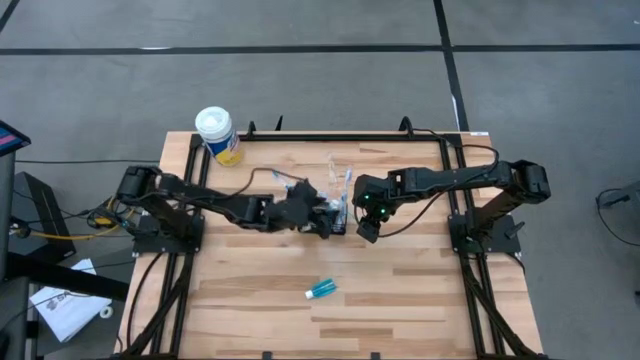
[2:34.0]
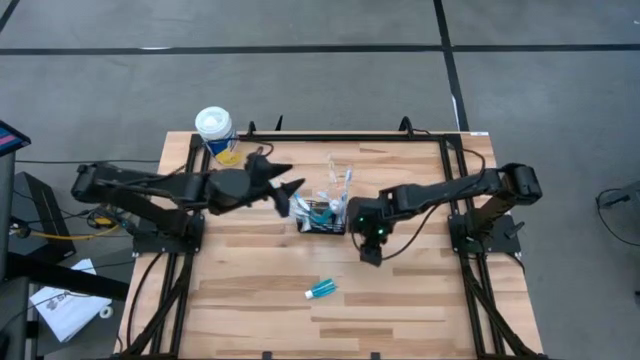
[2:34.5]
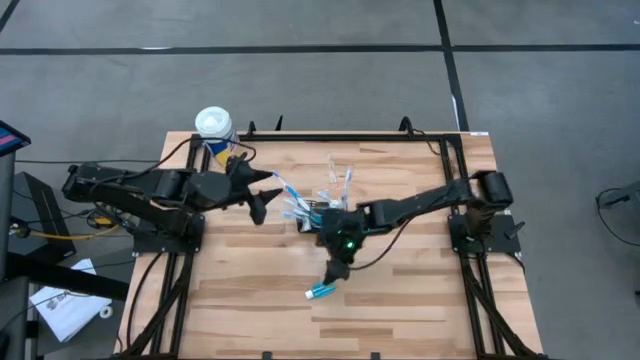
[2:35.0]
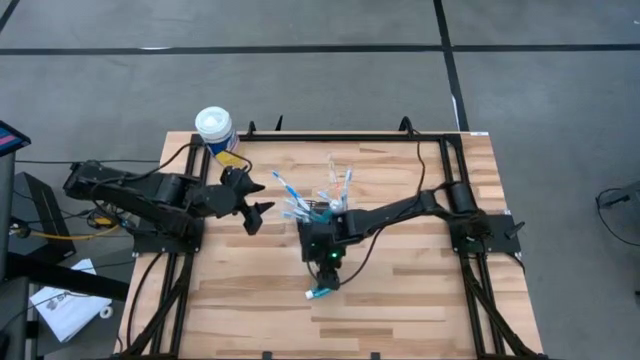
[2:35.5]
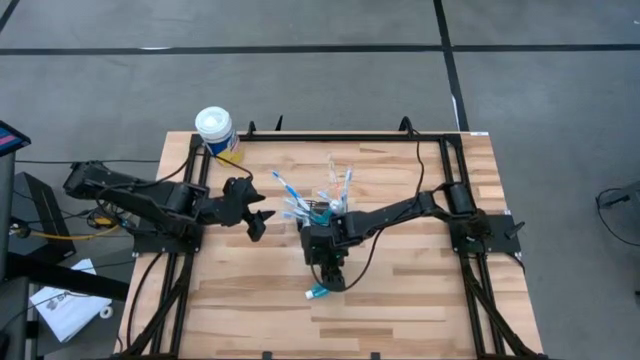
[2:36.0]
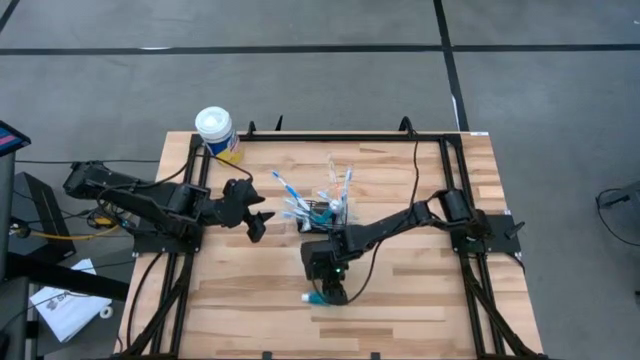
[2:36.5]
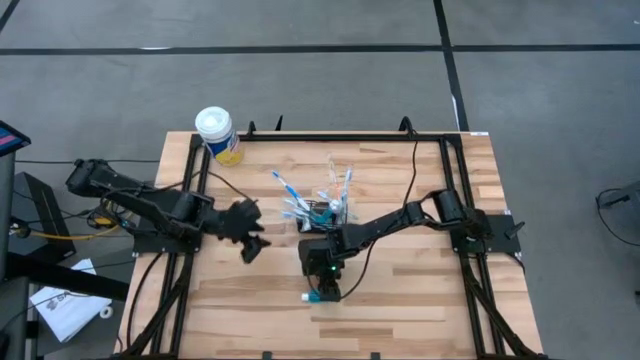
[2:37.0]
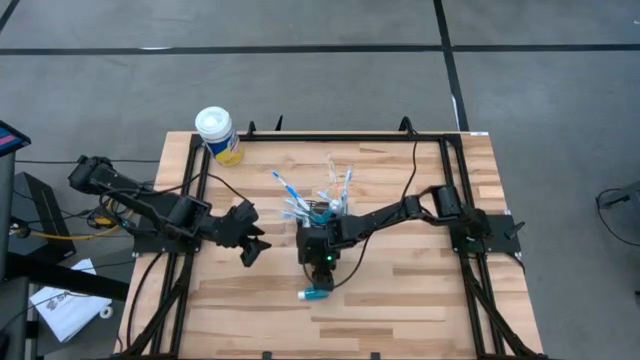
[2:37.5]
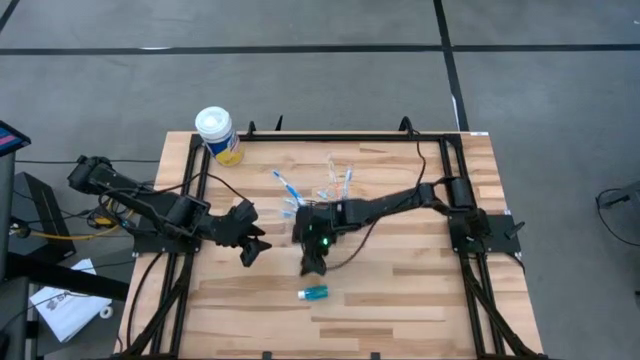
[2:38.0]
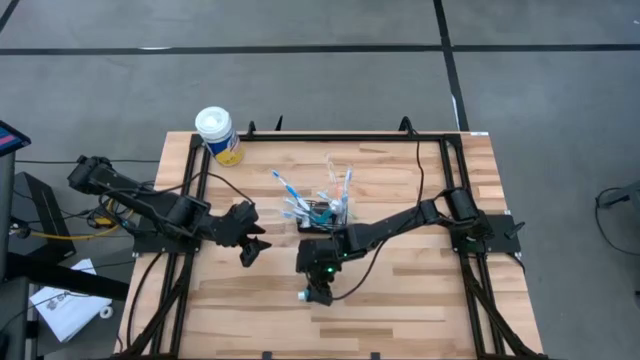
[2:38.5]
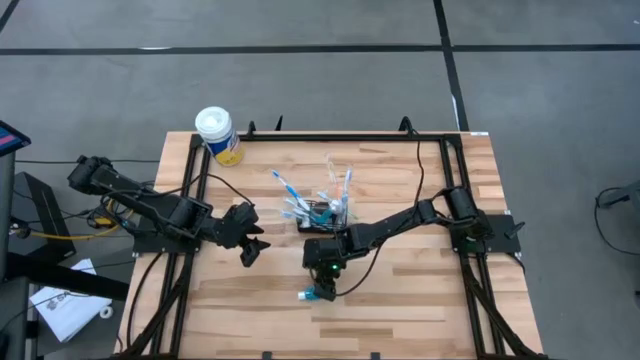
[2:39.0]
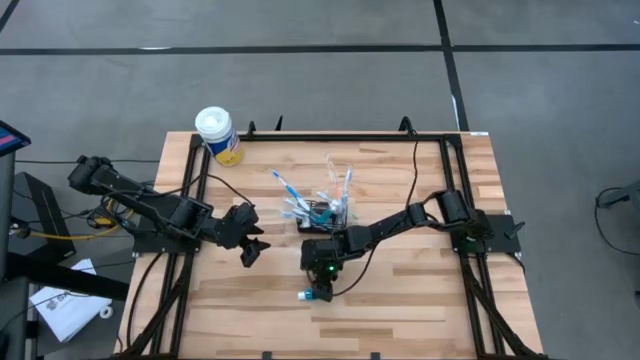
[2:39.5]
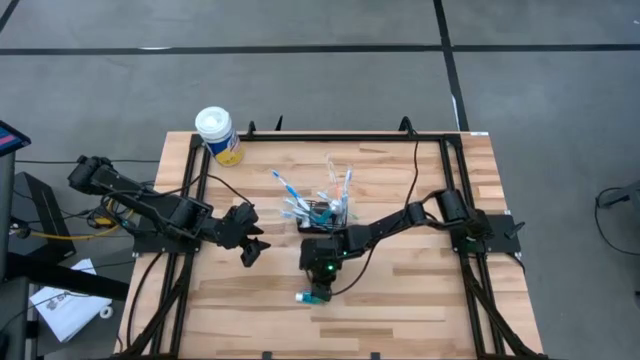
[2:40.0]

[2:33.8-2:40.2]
Task: Pick & Place toothbrushing station
Put the blue mouthwash into the mesh

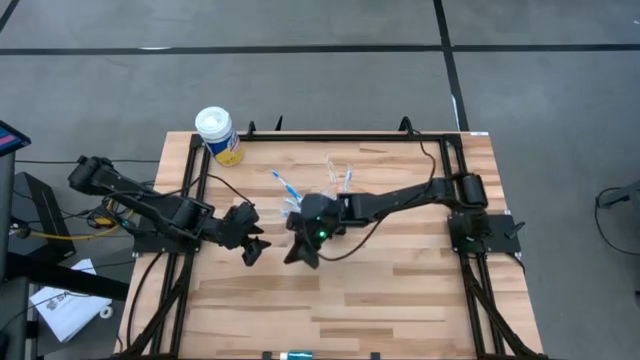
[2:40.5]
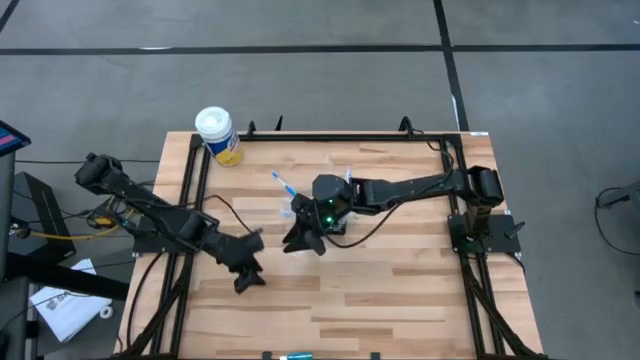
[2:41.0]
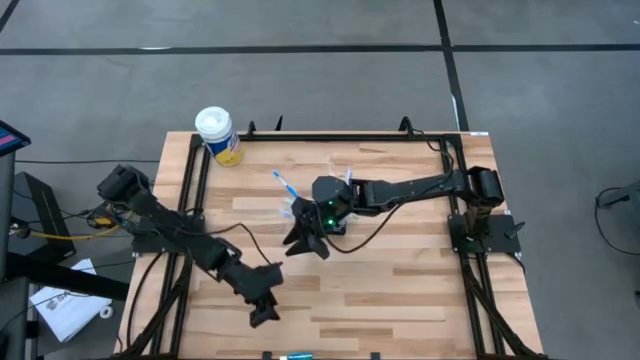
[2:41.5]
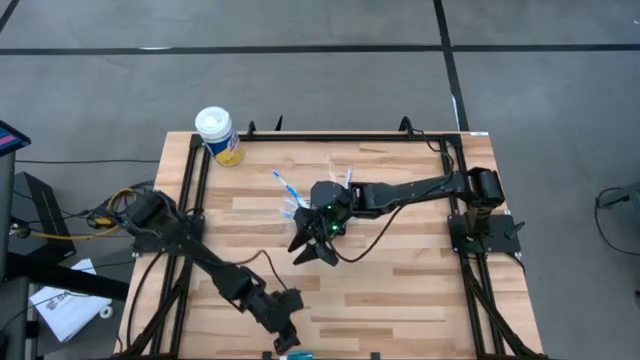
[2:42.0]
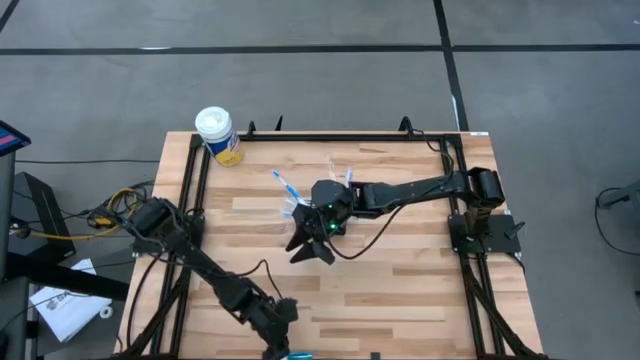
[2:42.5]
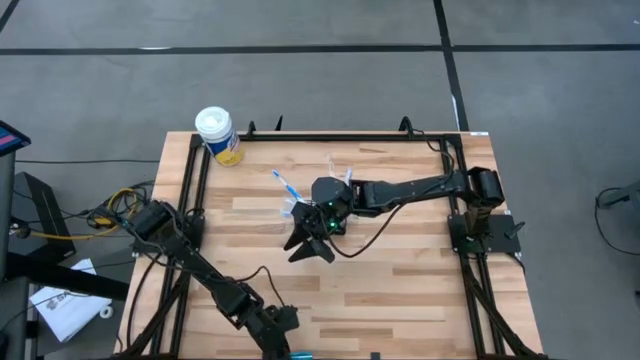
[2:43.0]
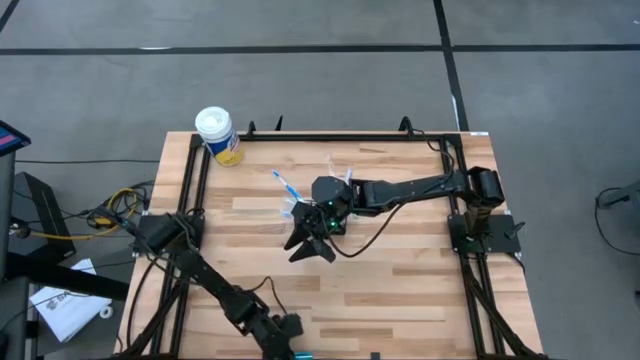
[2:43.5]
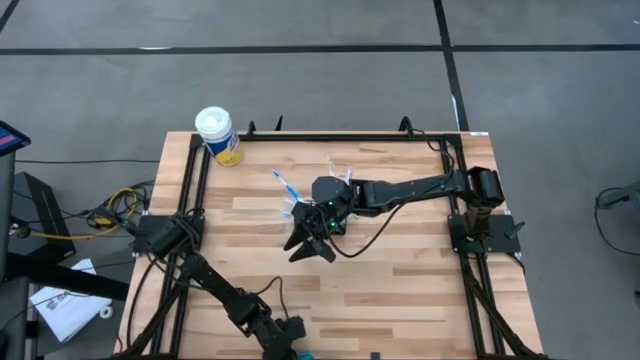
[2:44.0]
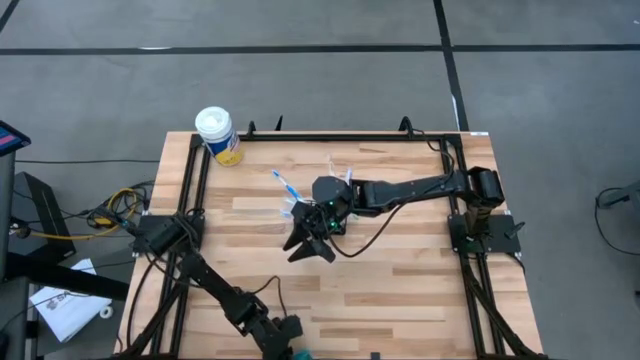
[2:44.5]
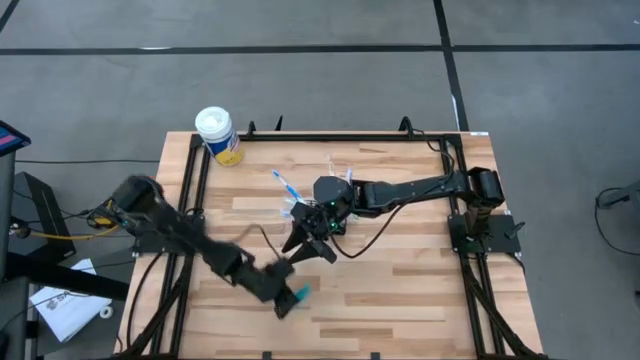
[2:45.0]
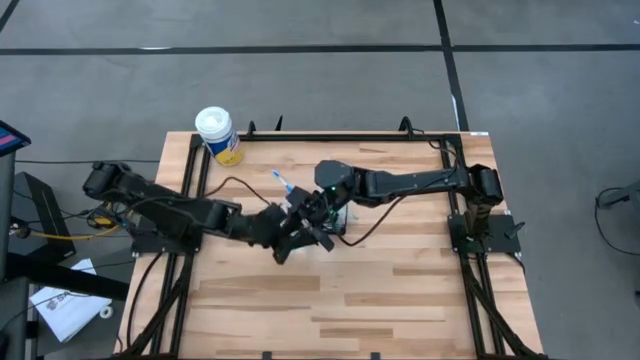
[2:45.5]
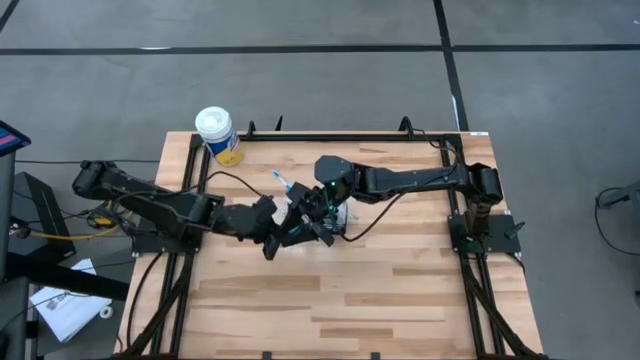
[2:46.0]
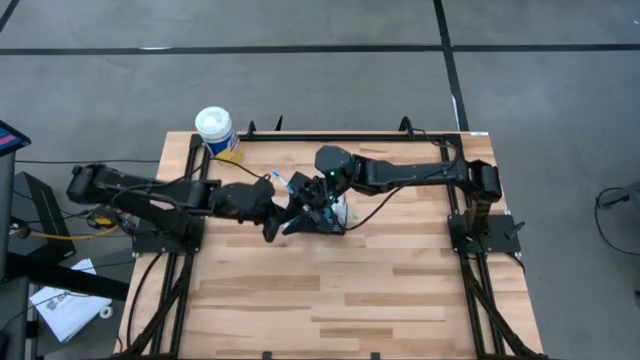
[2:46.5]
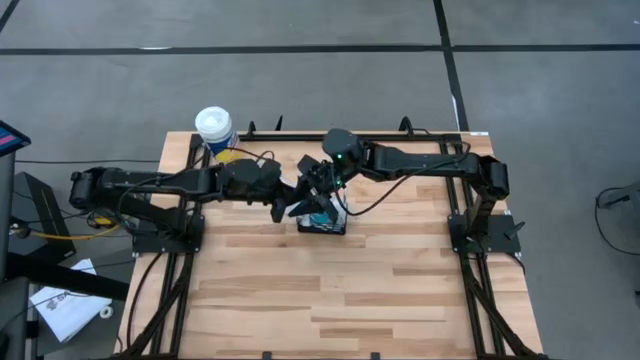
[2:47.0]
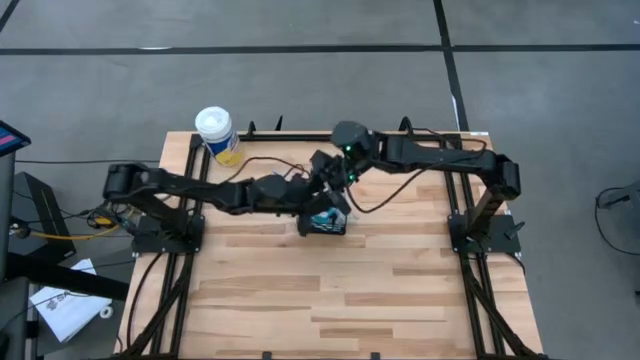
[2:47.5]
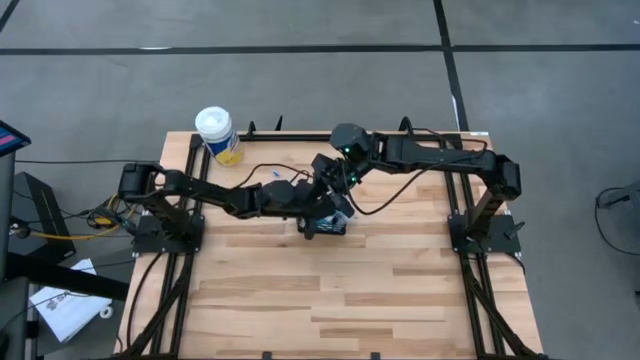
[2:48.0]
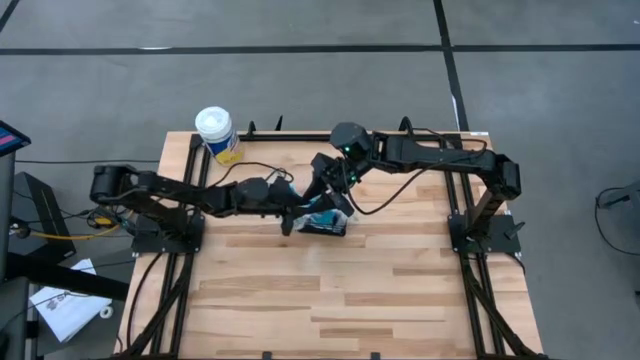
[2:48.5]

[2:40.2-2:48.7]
Put the blue mouthwash into the mesh

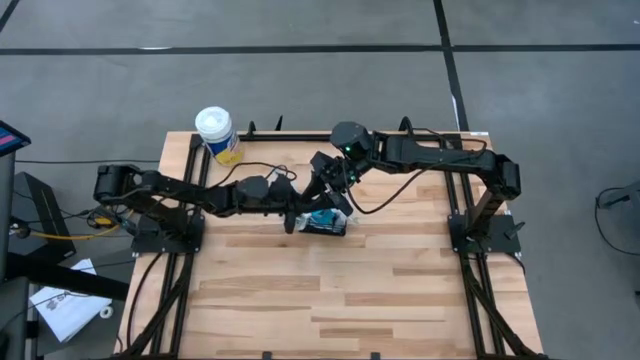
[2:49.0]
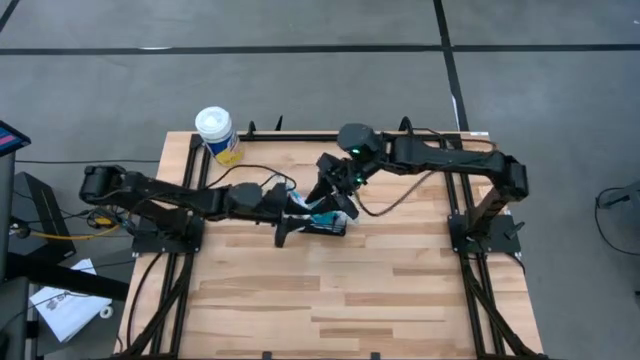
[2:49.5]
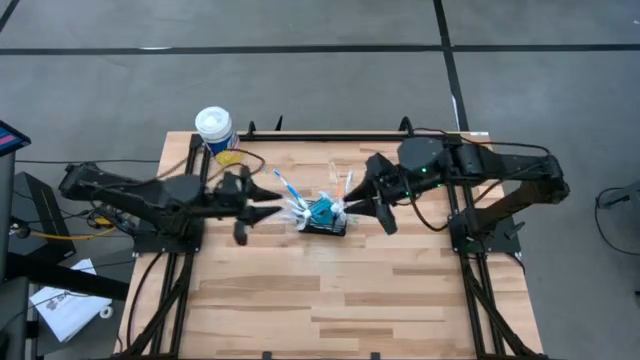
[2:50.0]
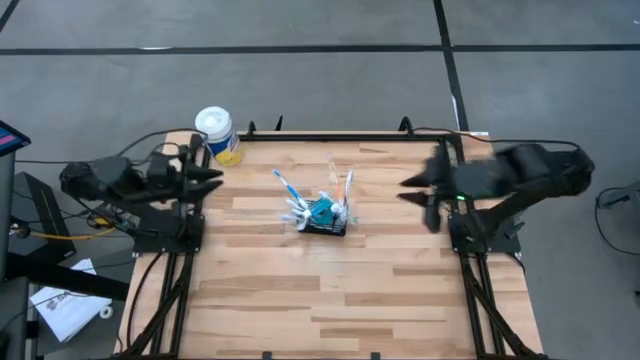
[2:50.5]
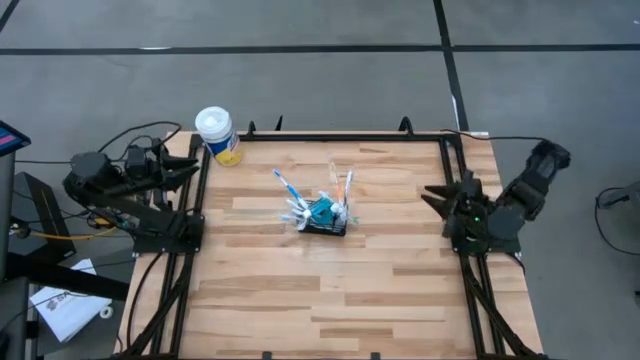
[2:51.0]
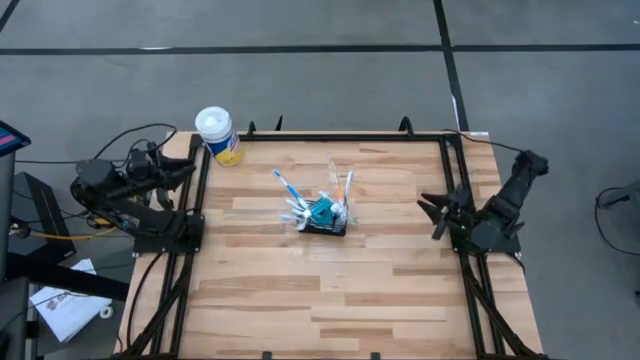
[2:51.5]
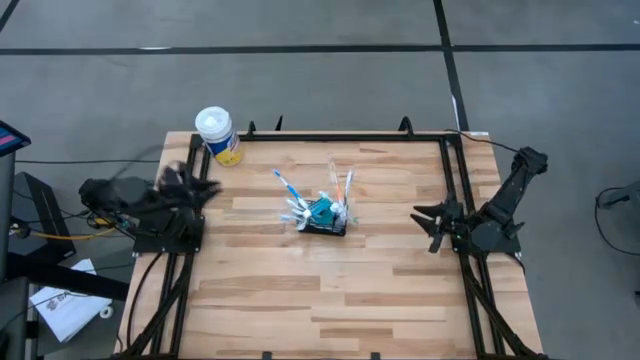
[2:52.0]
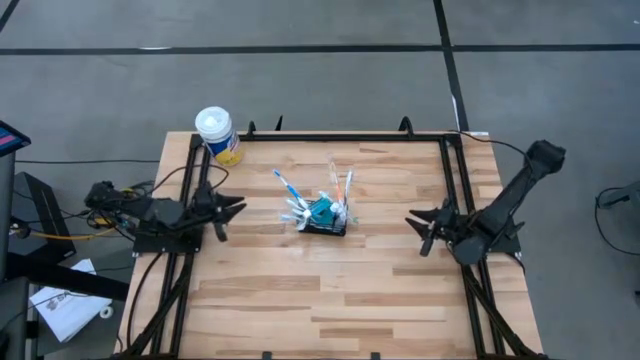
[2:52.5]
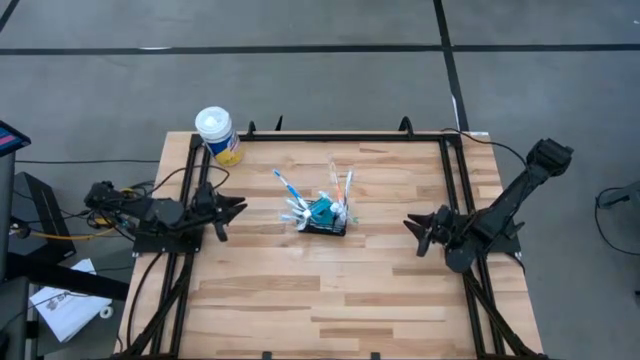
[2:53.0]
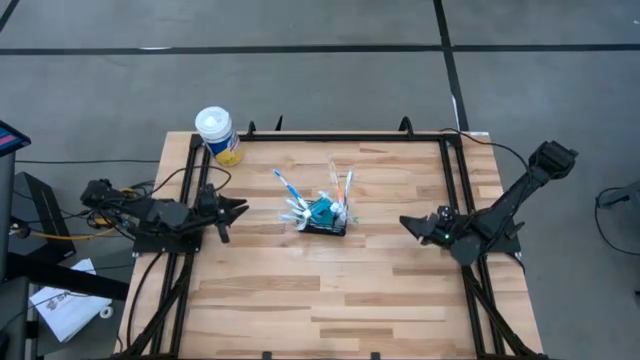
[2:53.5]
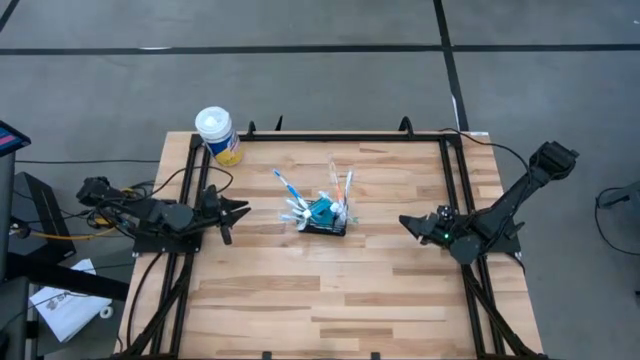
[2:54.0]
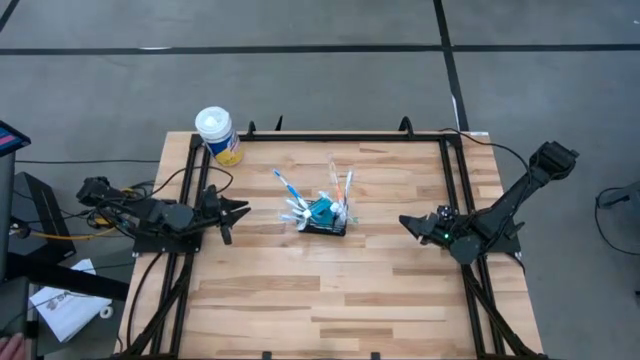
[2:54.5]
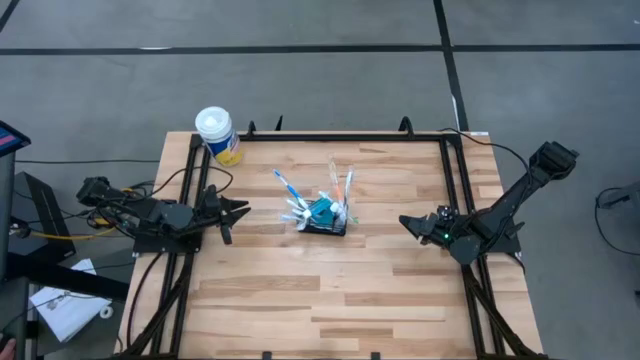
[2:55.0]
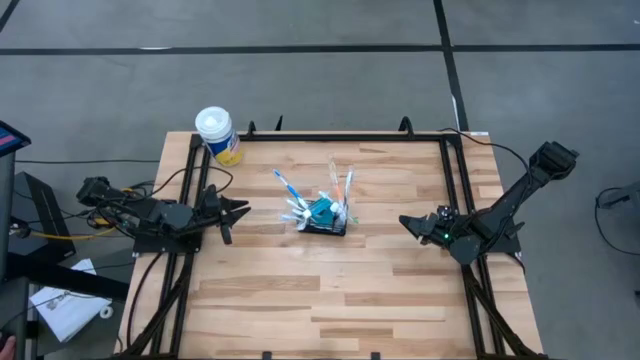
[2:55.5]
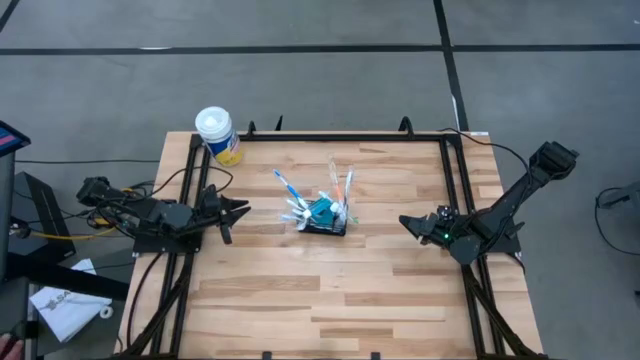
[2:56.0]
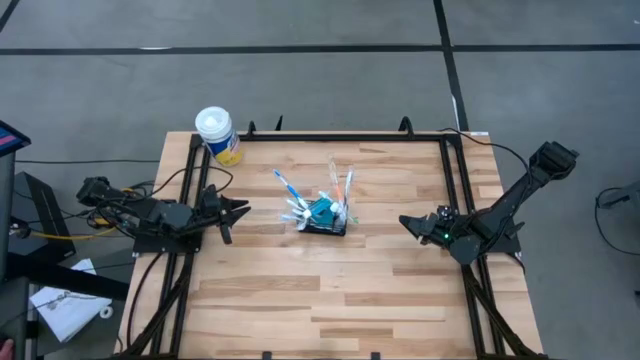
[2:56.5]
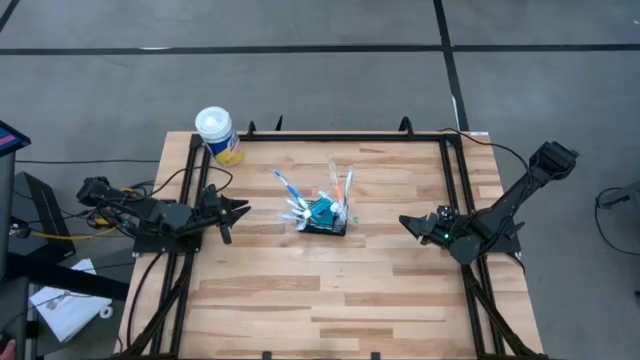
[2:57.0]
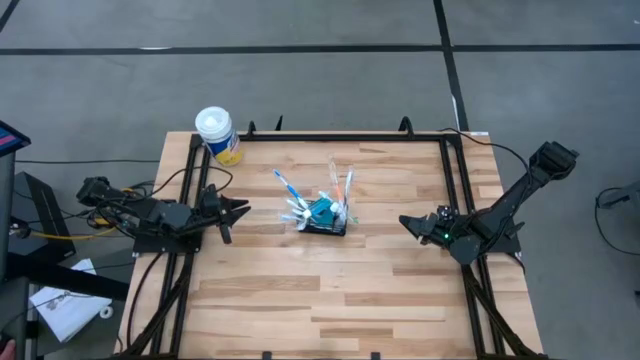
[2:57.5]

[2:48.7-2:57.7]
Return to Home Position
